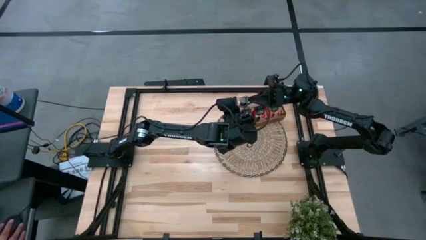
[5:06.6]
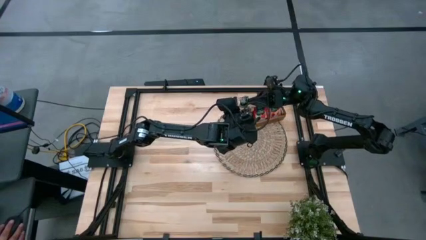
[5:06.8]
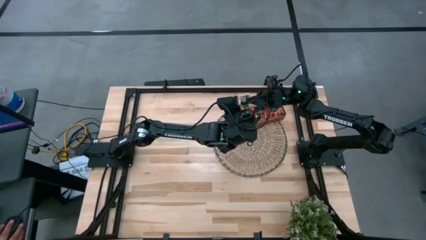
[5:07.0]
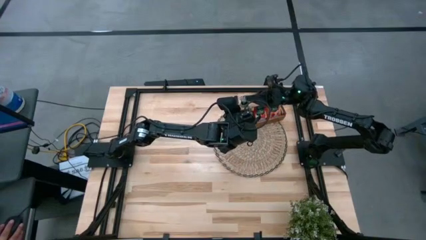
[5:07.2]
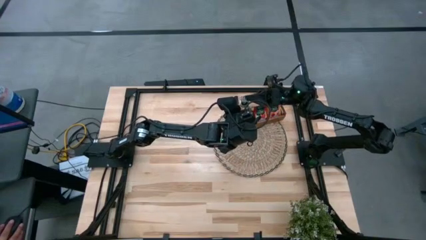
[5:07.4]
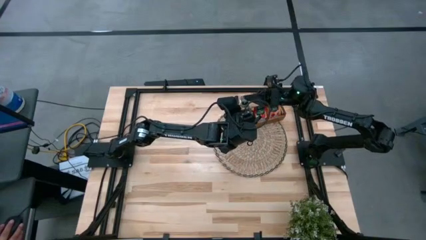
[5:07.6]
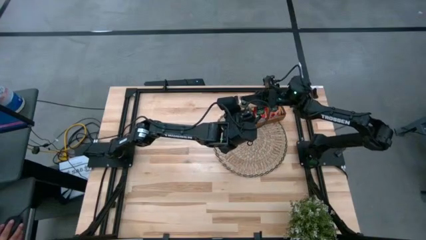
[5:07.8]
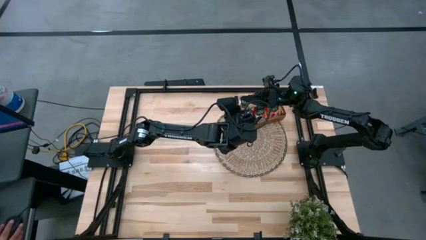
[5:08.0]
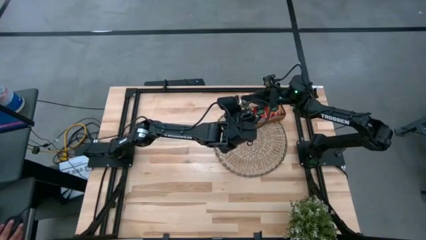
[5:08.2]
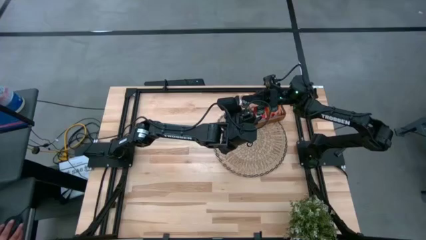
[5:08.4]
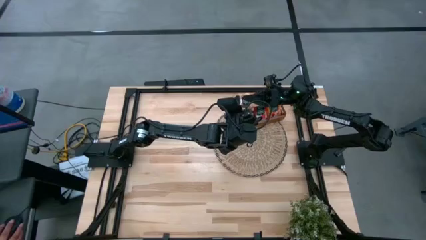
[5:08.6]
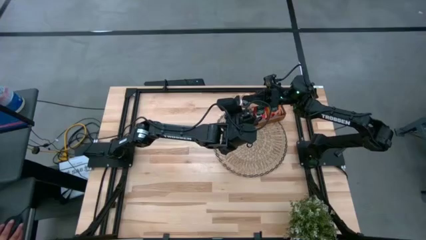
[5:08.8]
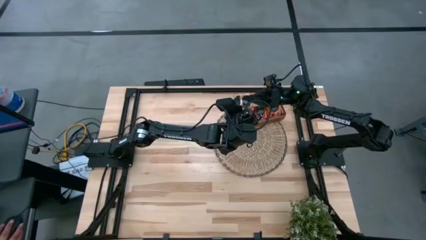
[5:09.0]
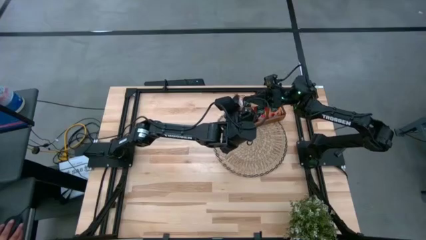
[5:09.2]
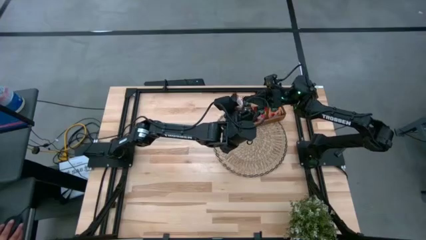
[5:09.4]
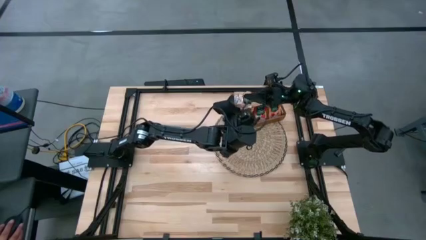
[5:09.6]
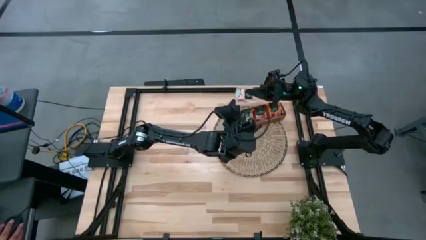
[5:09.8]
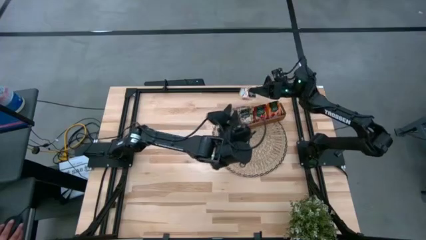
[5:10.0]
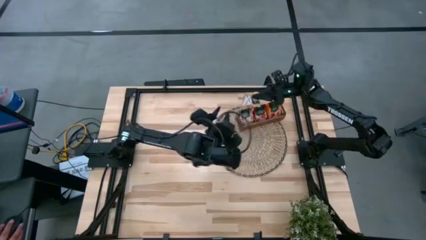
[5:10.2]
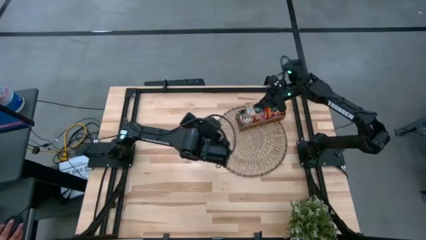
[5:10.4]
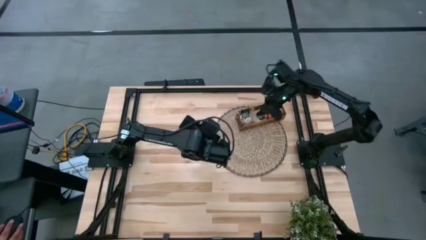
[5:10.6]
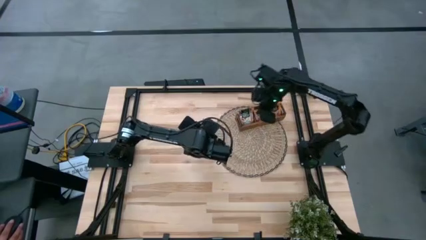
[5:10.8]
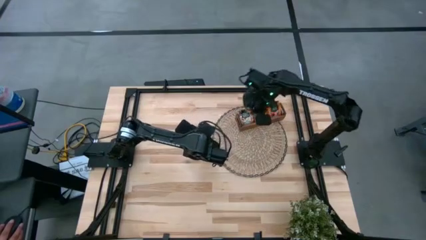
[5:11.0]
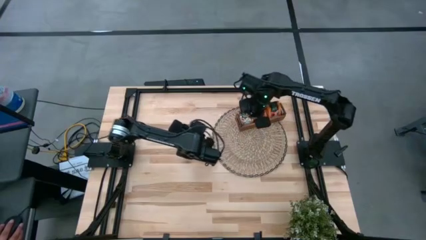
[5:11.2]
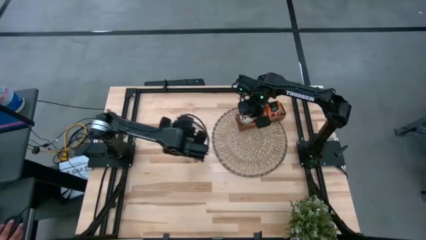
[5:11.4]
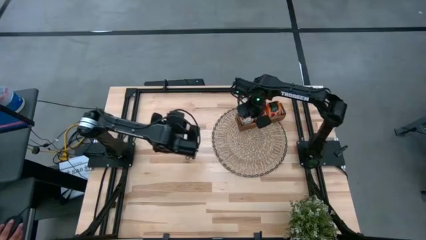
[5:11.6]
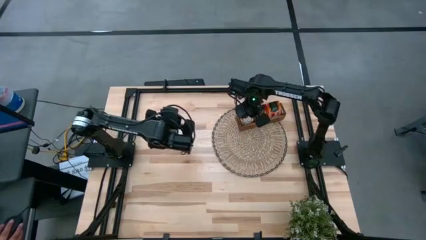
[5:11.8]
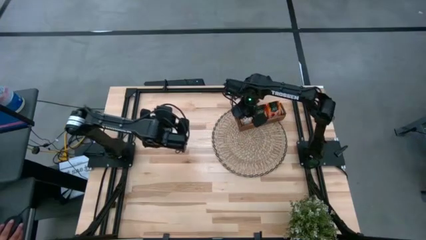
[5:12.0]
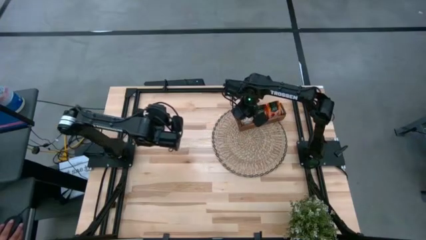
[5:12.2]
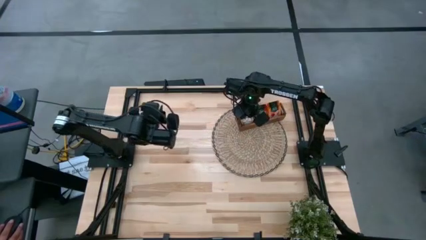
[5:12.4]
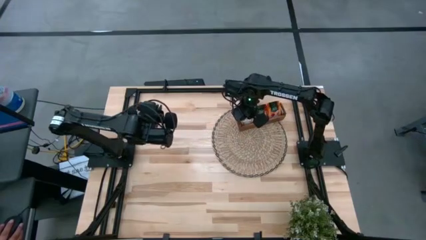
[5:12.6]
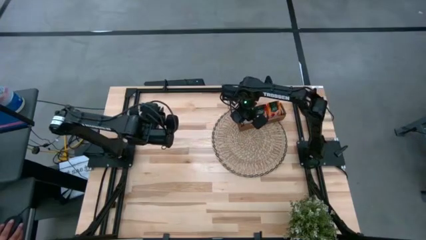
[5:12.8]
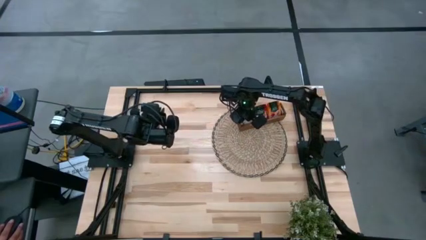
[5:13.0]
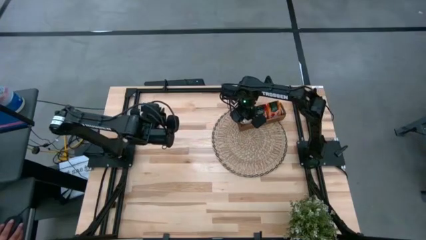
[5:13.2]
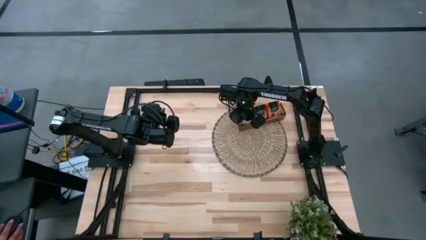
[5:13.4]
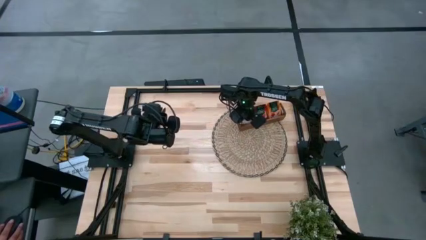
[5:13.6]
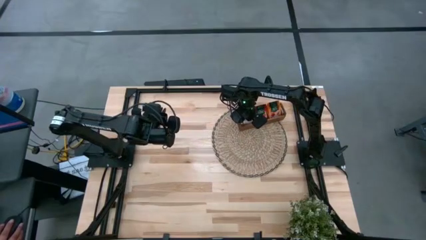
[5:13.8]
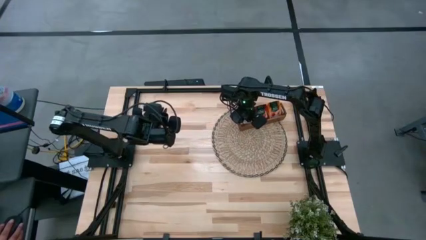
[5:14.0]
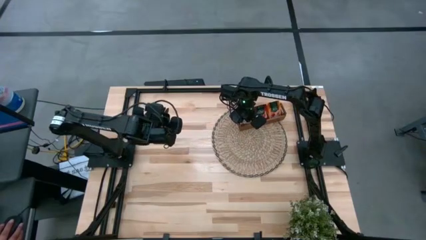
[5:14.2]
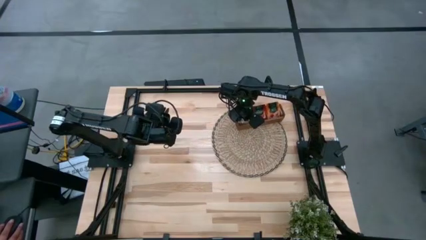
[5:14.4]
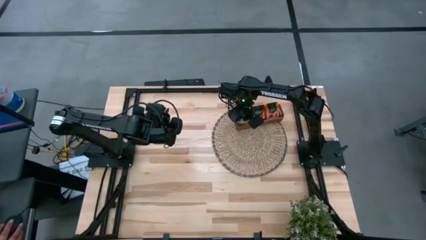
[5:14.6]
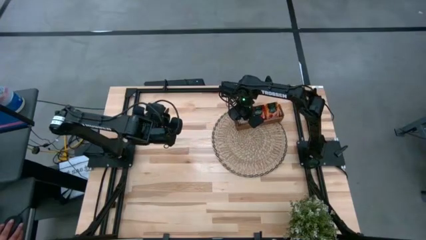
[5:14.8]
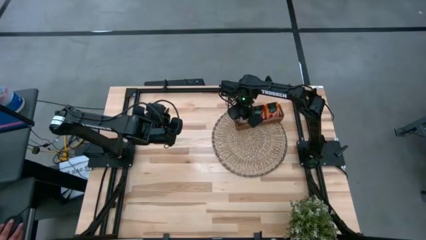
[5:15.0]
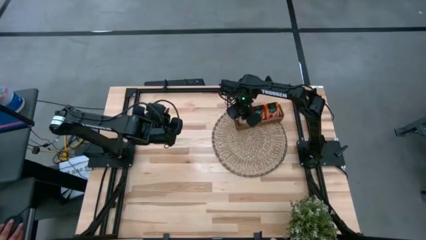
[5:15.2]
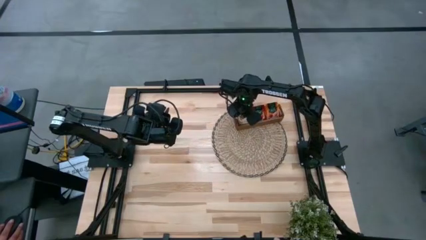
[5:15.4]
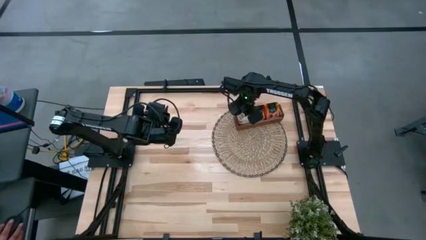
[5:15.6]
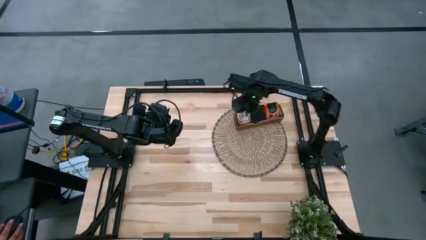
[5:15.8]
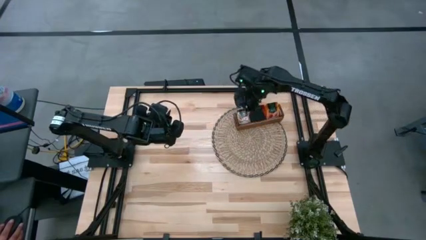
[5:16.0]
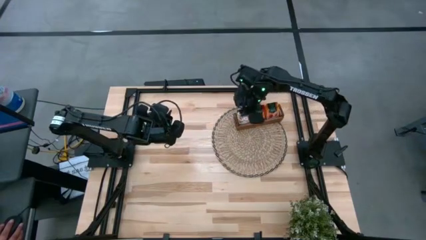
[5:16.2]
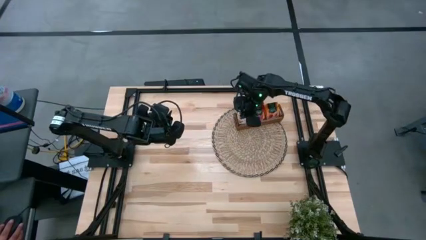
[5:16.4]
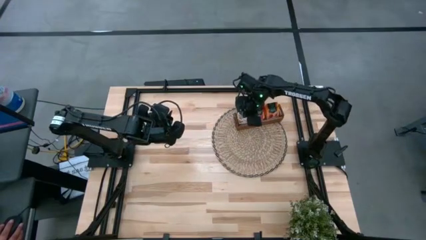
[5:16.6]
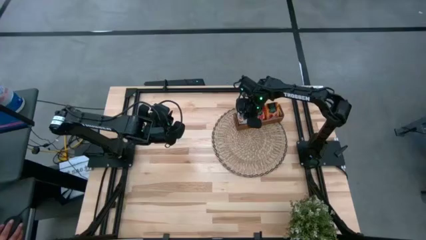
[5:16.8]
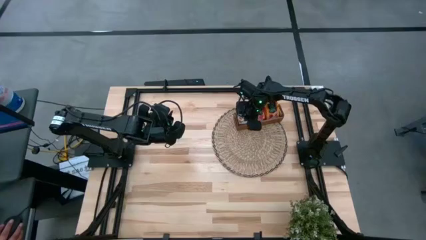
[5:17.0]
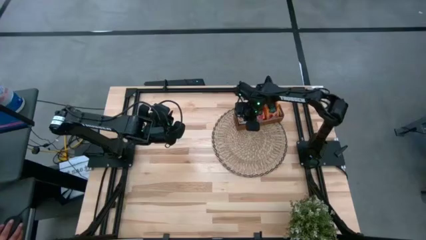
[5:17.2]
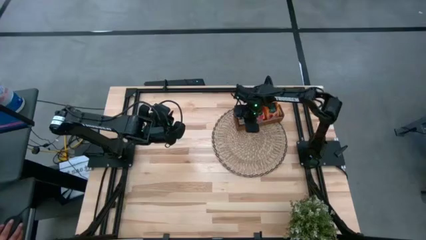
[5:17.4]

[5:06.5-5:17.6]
Task: Pick & Place Tea
Put the brown tea pack into the brown organizer

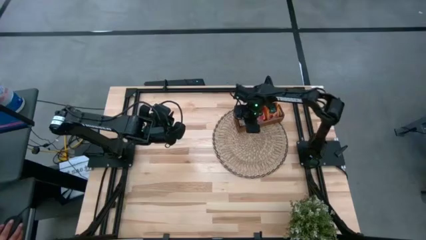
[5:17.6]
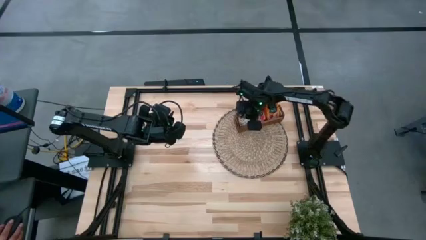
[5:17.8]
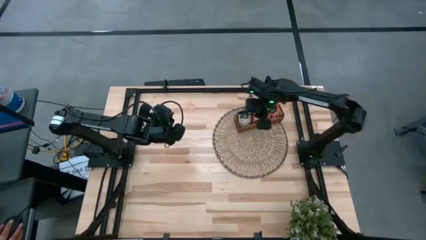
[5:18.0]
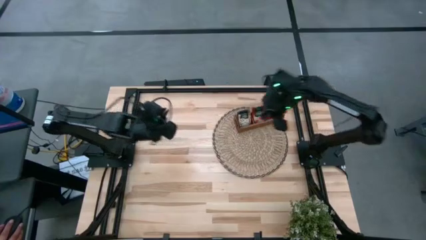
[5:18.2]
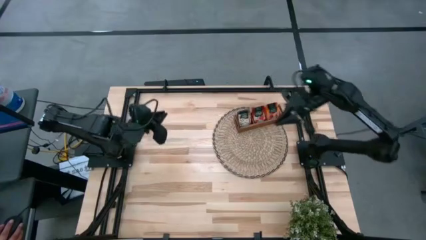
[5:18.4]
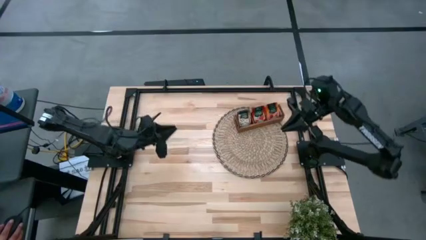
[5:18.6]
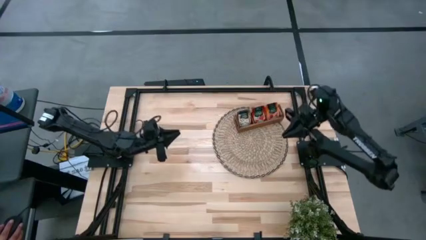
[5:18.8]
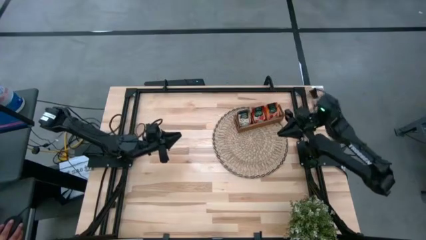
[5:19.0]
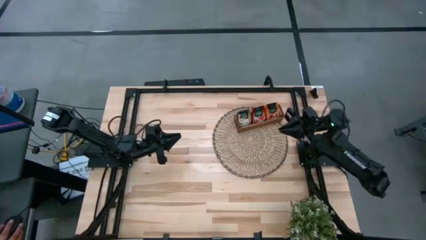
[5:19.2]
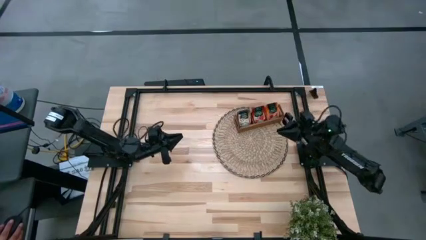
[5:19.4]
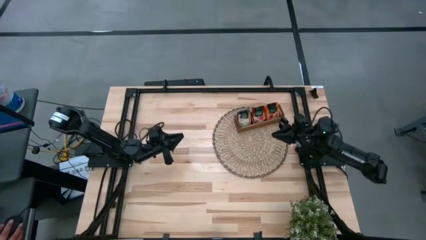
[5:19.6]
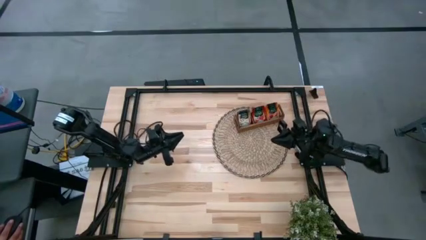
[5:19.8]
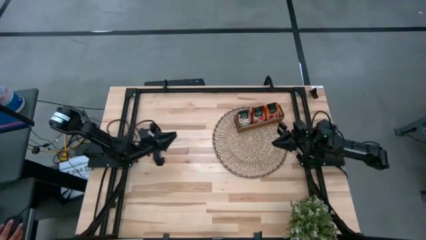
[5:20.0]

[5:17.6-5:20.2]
Return to Home Position
